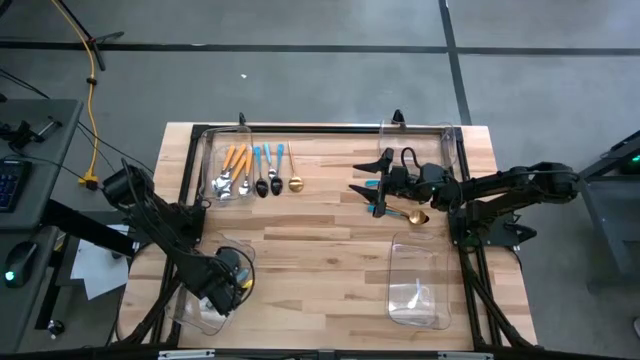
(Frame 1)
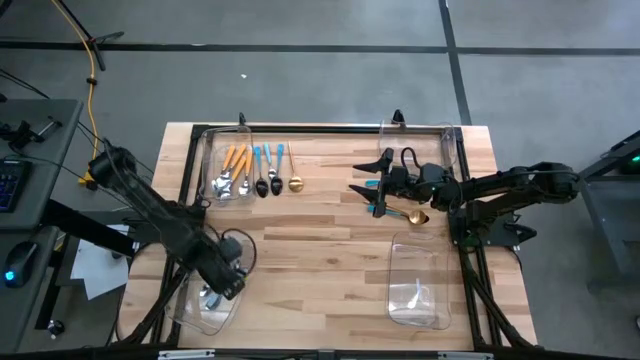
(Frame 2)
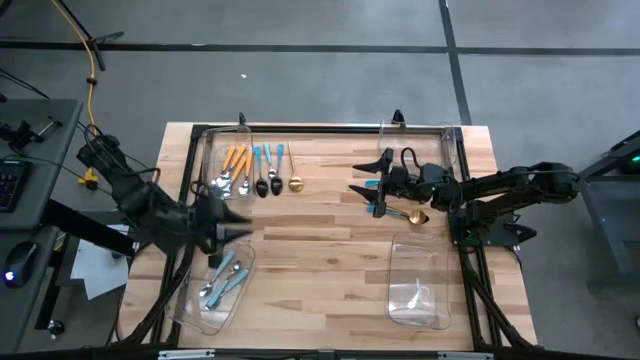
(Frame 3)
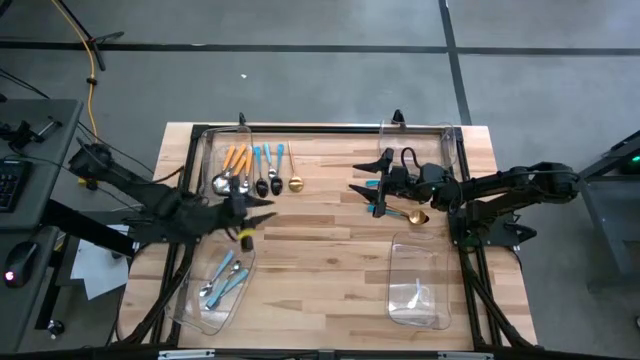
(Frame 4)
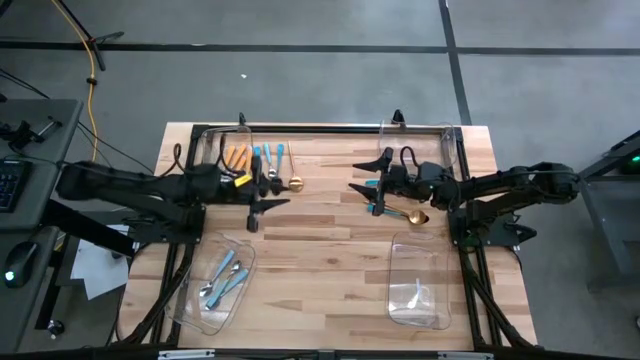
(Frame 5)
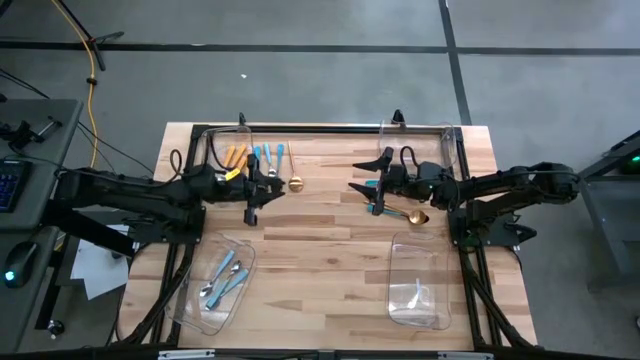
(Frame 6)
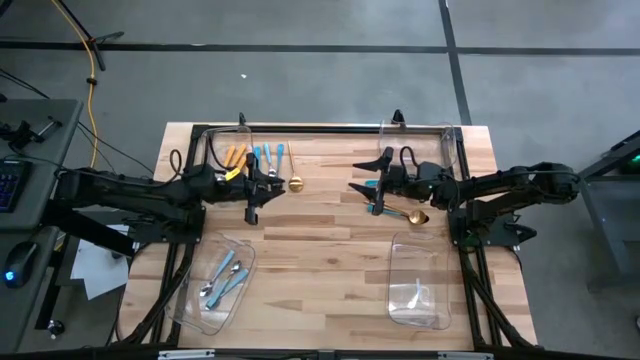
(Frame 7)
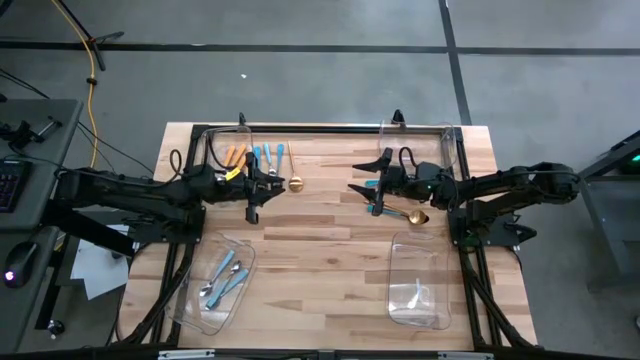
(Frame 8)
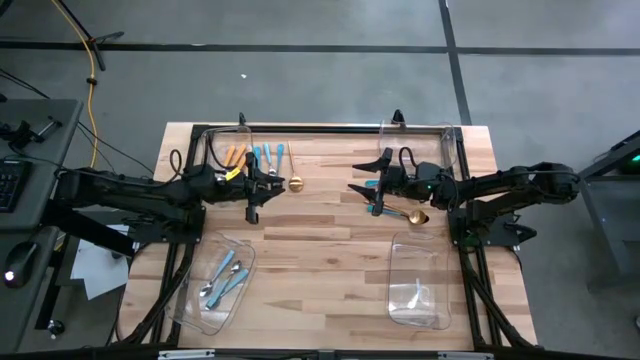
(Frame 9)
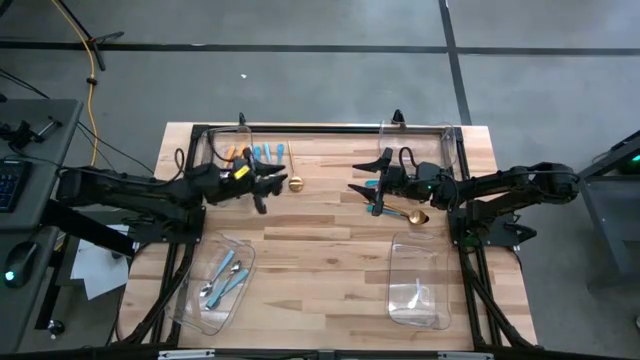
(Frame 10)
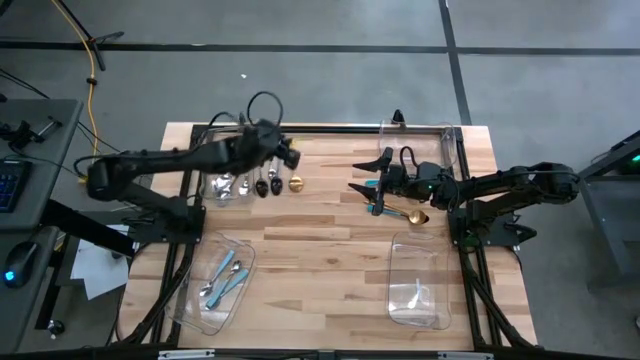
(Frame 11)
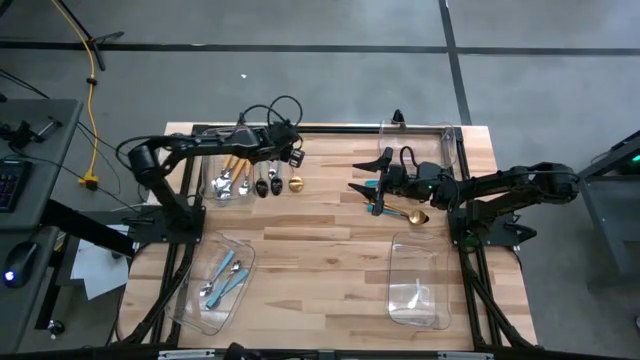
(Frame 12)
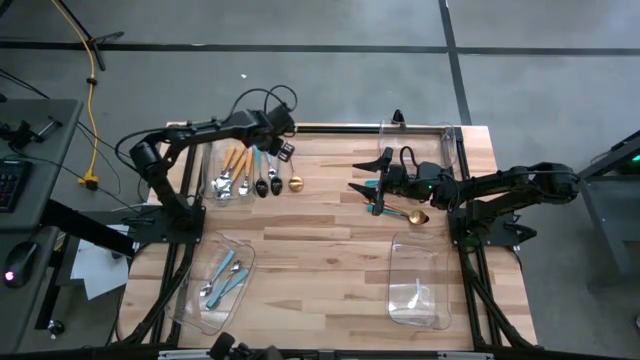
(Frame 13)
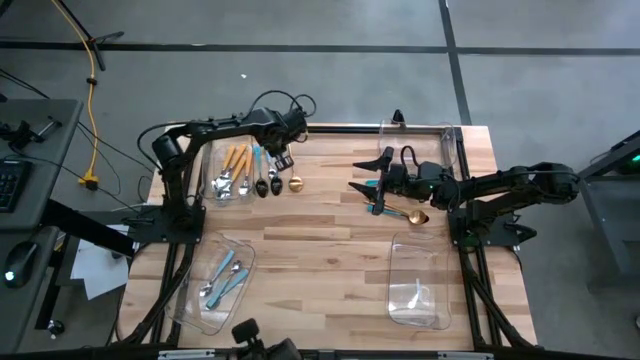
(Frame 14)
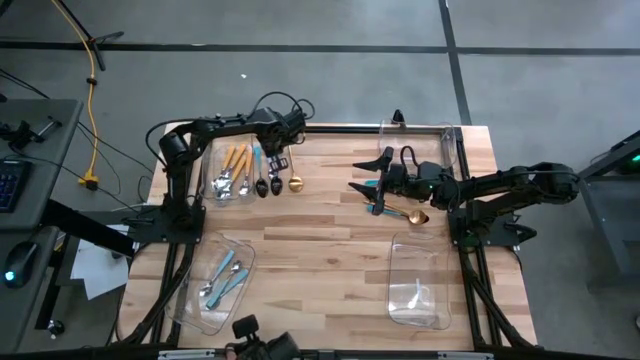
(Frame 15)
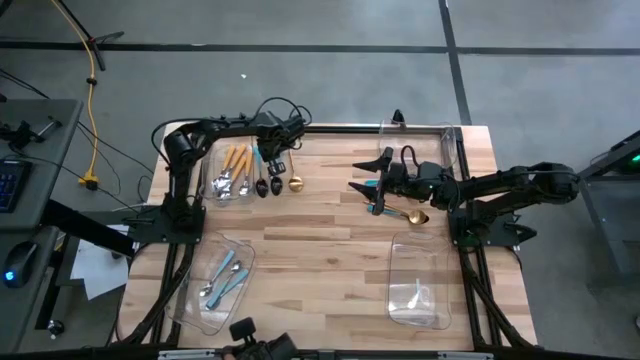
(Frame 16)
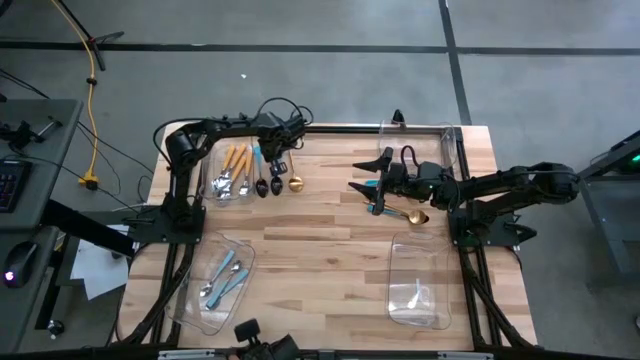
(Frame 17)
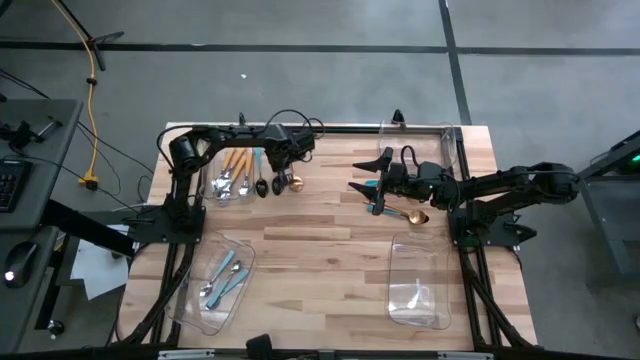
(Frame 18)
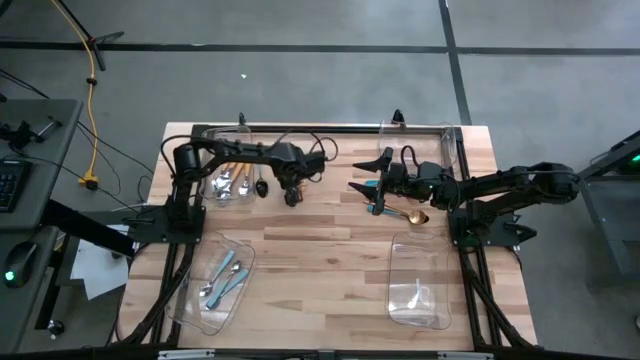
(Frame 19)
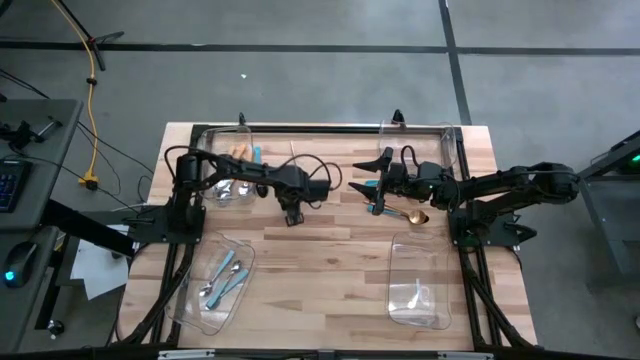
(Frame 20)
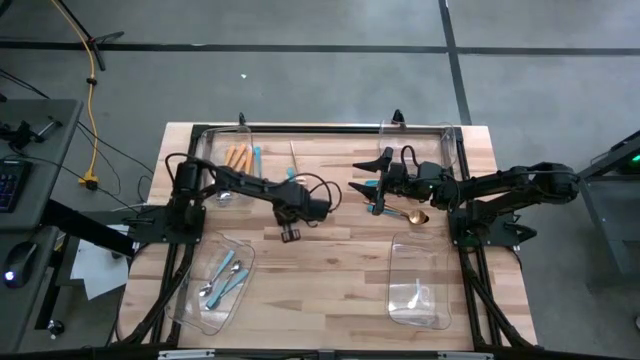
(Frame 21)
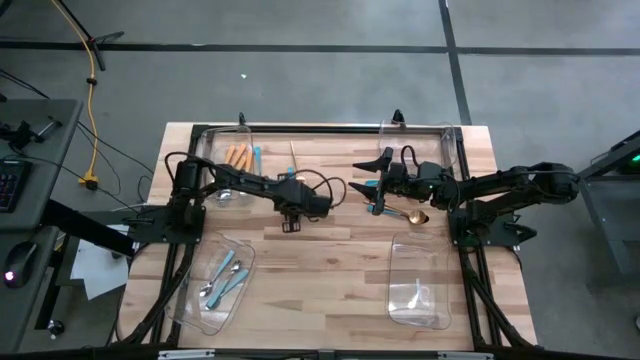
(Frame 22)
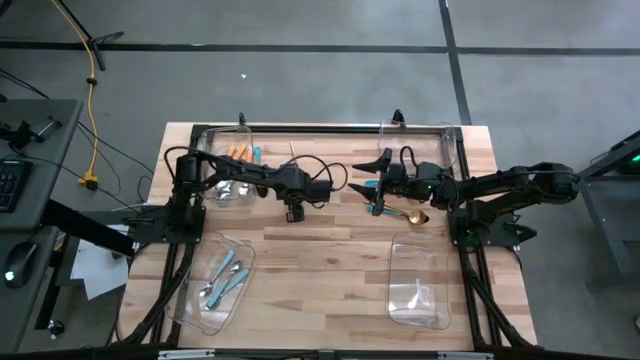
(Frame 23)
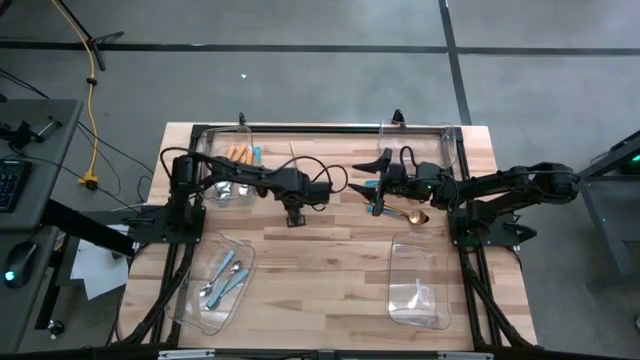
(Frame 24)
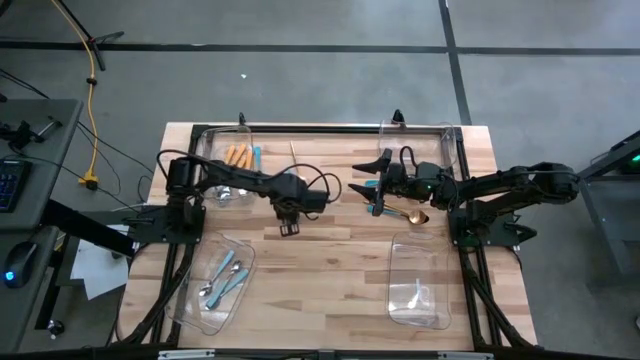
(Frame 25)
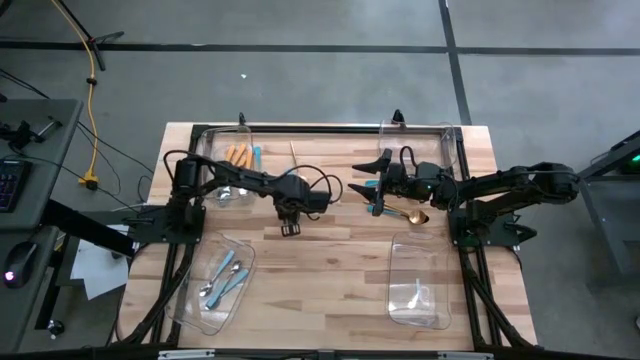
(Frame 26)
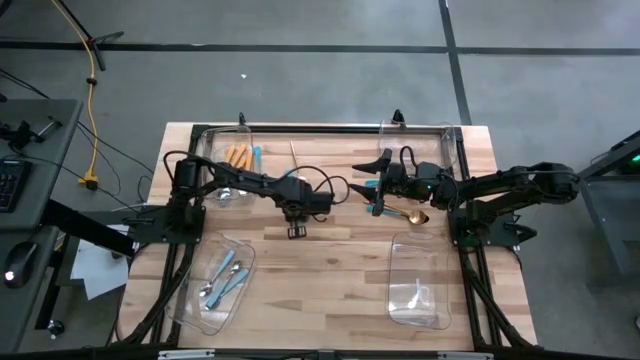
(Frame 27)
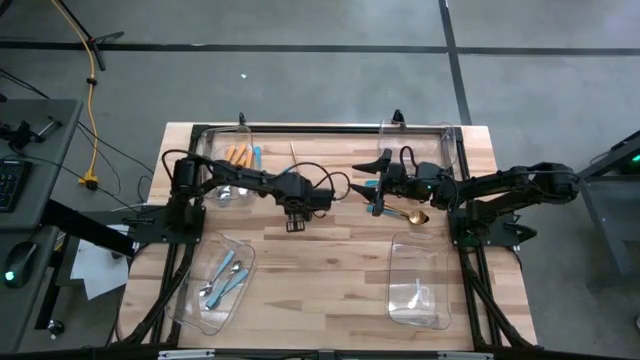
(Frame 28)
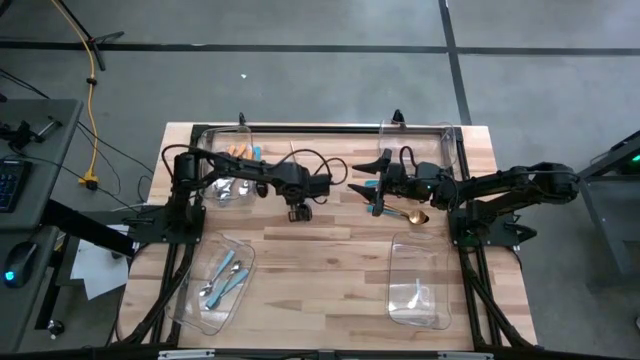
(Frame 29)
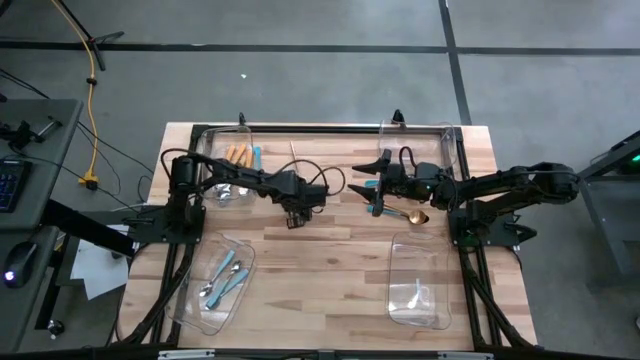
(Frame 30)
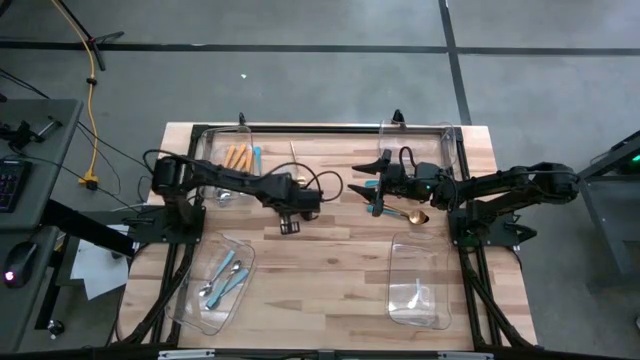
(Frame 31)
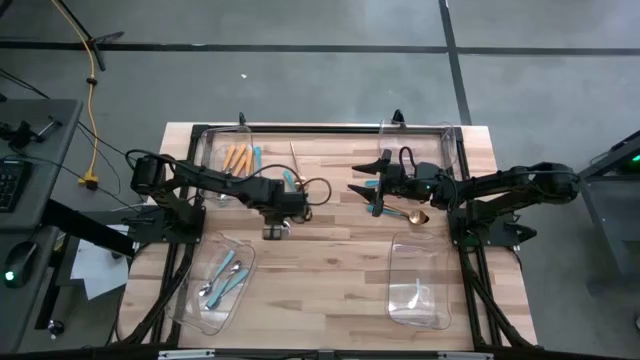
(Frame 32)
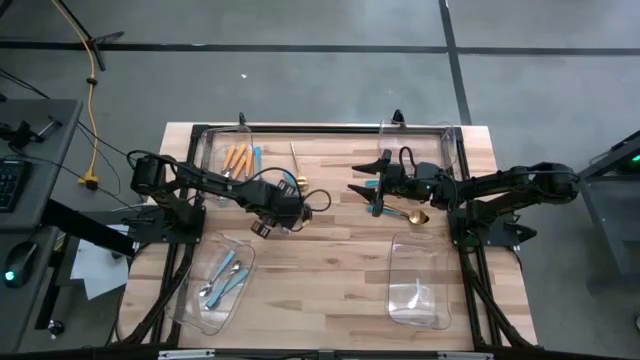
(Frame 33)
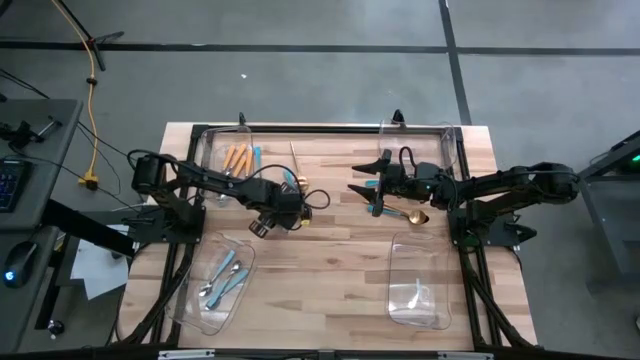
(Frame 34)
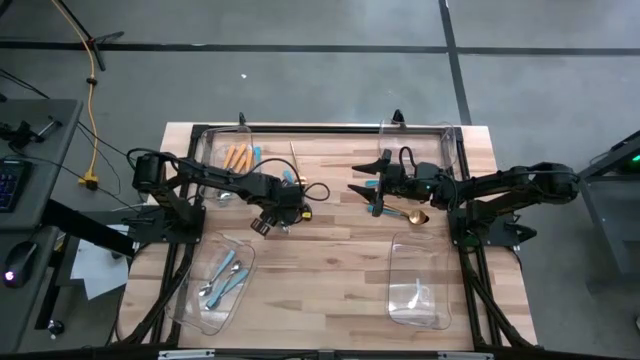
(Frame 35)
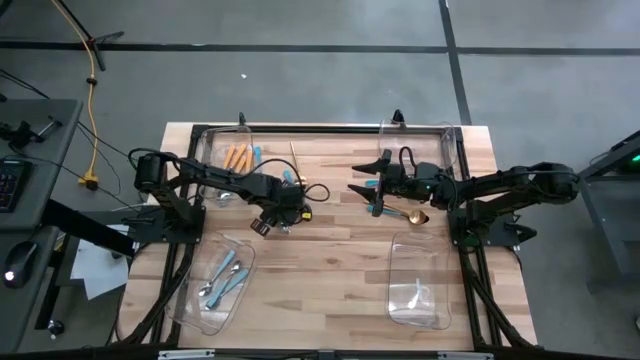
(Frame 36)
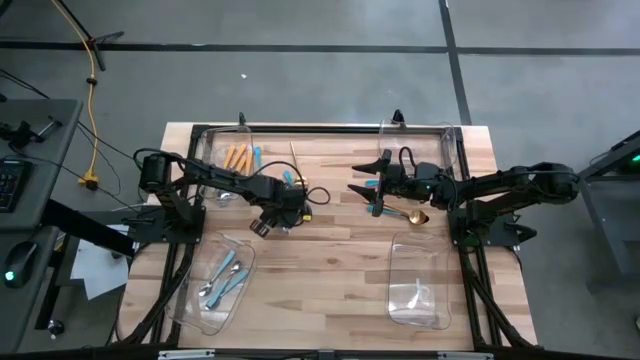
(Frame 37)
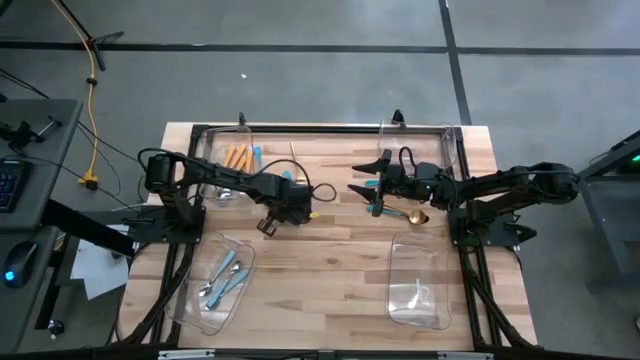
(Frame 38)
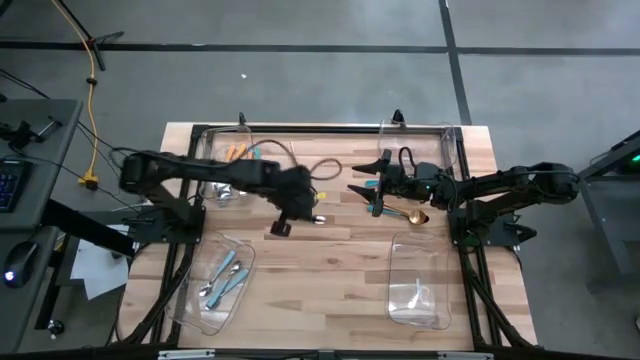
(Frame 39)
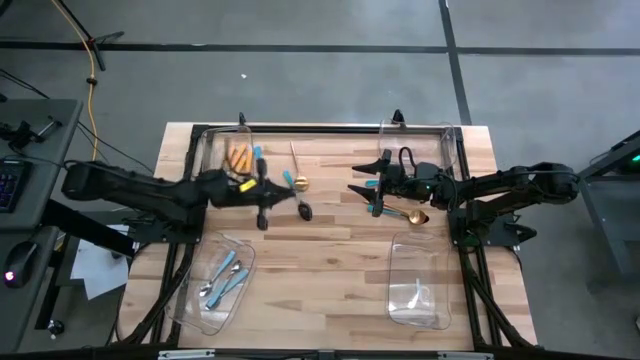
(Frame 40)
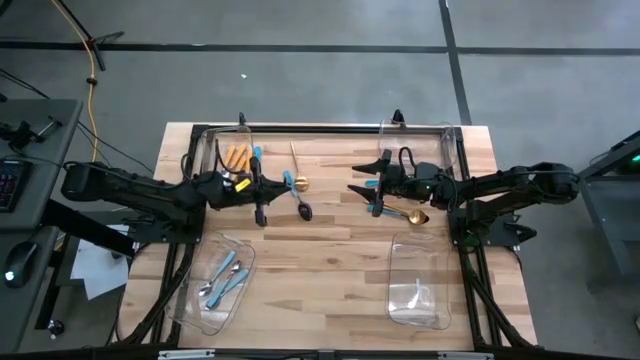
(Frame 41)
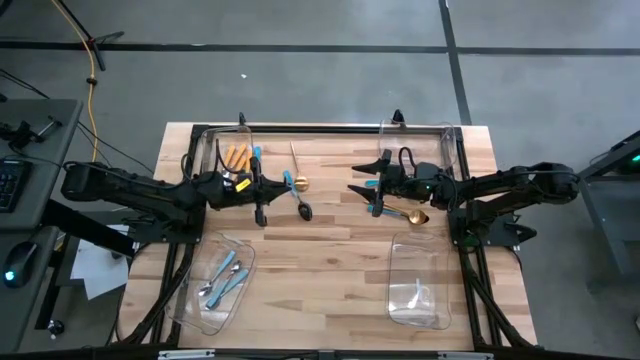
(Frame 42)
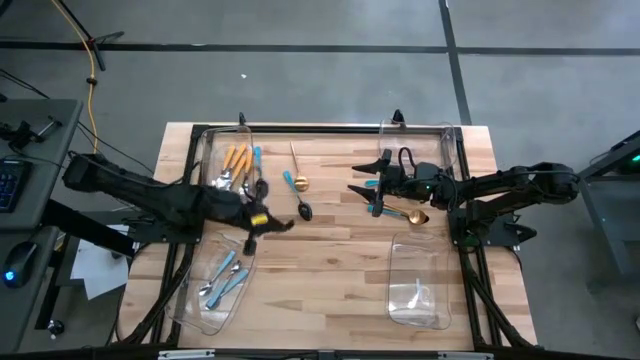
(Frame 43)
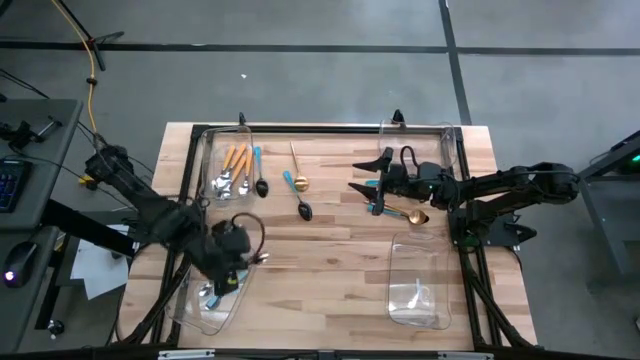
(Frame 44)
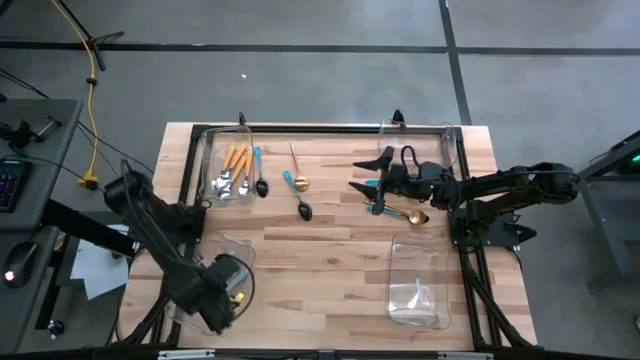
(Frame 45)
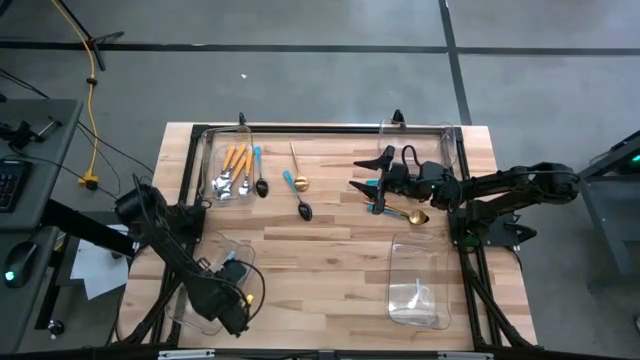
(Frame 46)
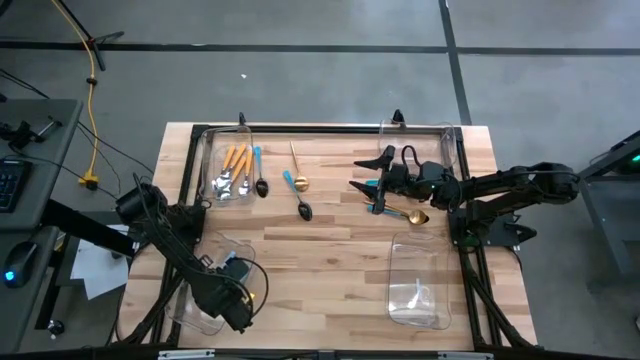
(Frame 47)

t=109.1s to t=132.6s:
Task: Sort silverware by color (type)
Put the light blue spoon into the bottom left transparent bin
